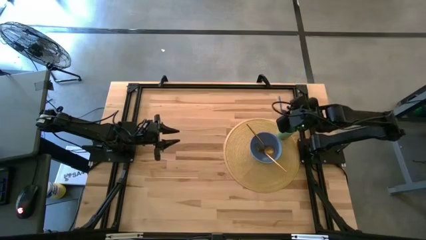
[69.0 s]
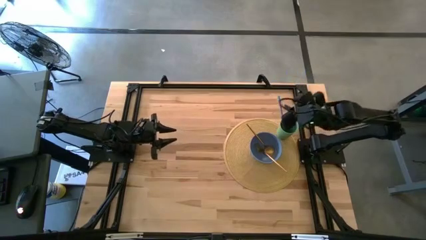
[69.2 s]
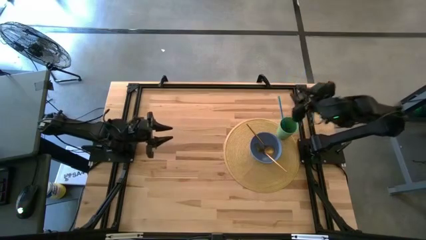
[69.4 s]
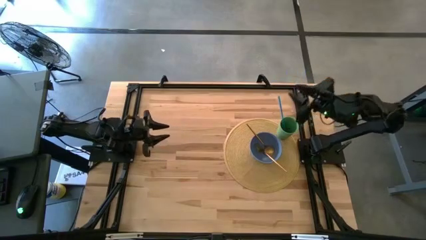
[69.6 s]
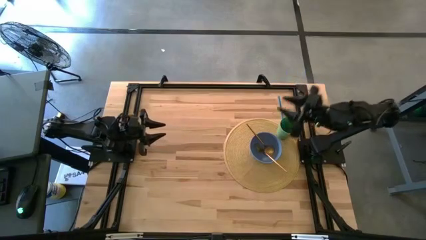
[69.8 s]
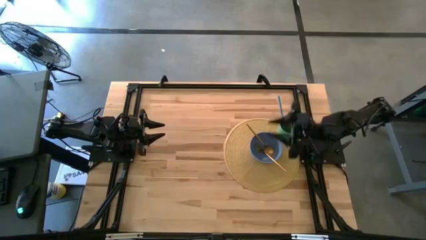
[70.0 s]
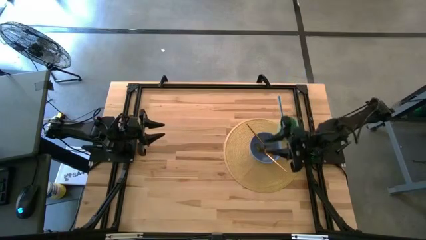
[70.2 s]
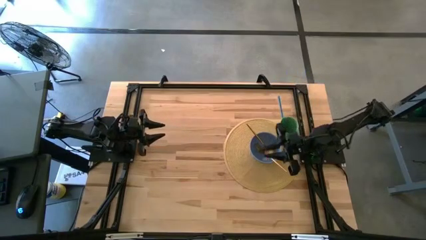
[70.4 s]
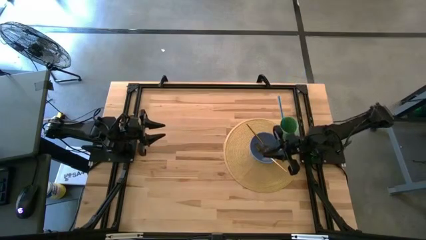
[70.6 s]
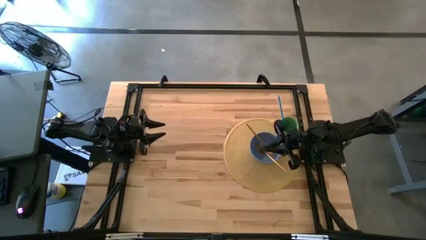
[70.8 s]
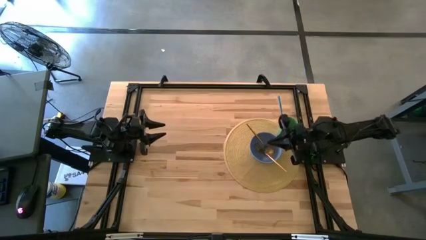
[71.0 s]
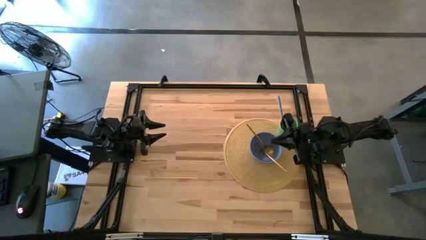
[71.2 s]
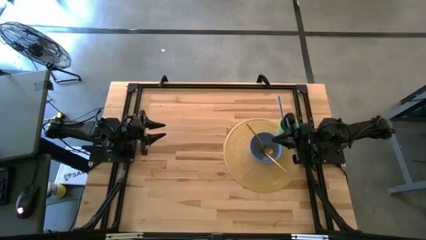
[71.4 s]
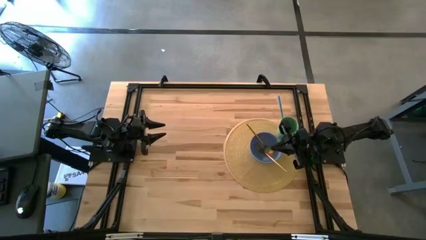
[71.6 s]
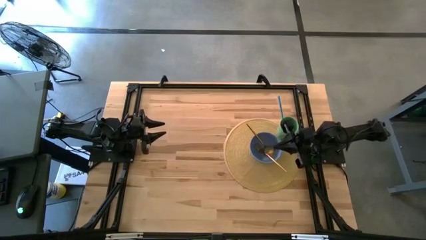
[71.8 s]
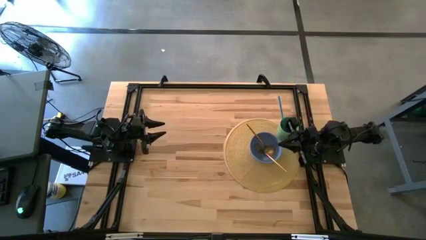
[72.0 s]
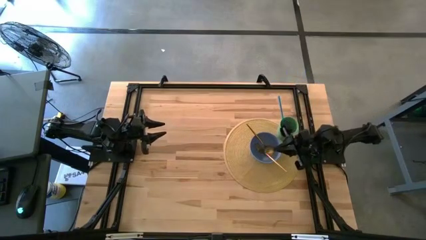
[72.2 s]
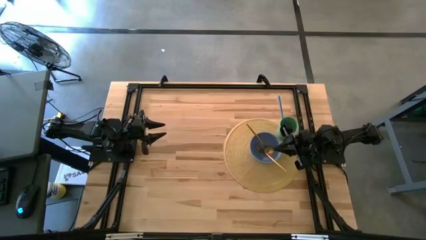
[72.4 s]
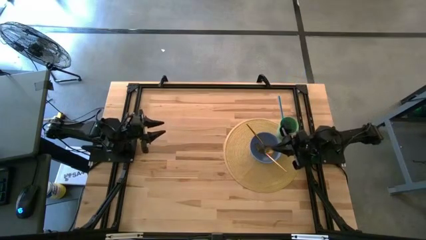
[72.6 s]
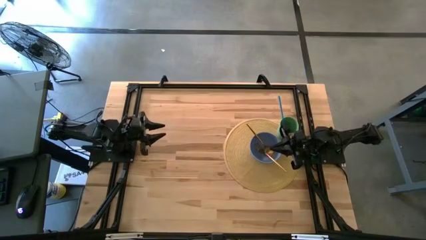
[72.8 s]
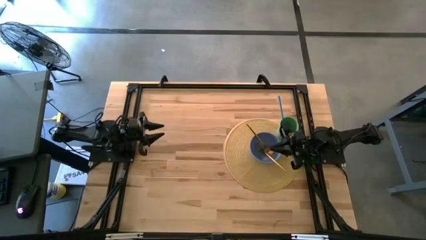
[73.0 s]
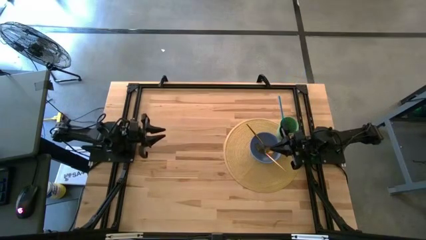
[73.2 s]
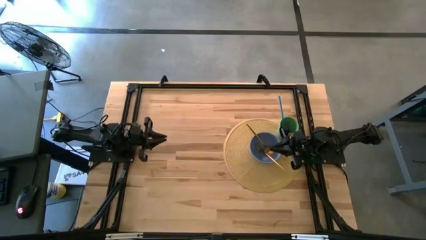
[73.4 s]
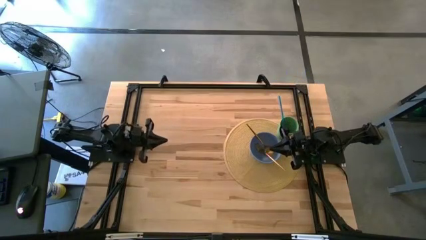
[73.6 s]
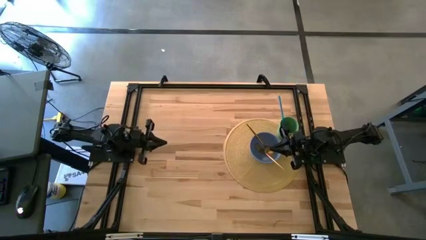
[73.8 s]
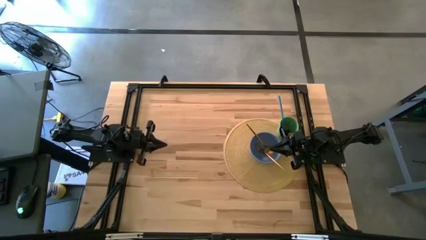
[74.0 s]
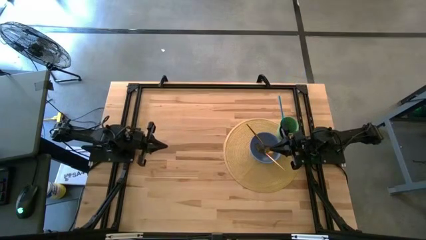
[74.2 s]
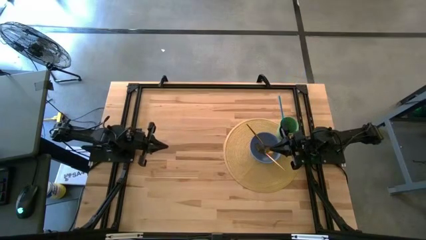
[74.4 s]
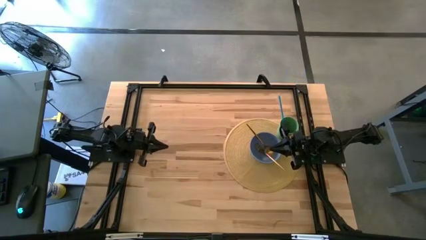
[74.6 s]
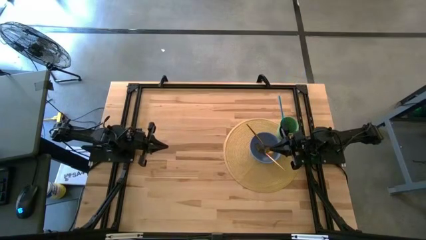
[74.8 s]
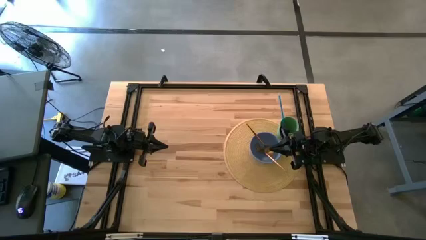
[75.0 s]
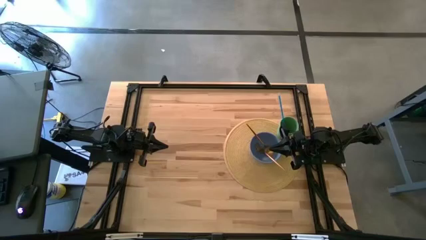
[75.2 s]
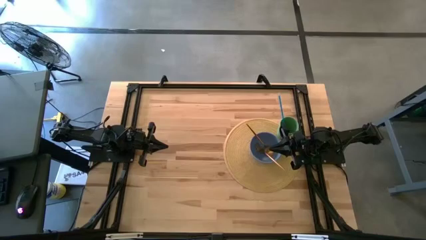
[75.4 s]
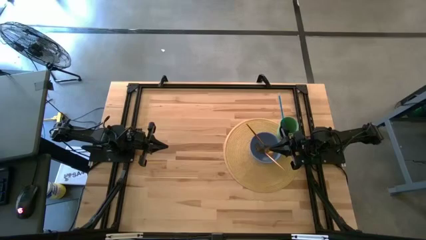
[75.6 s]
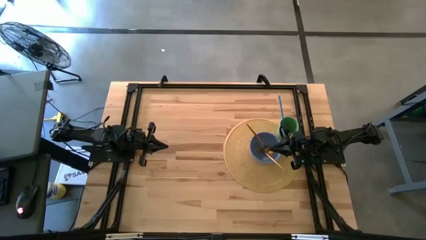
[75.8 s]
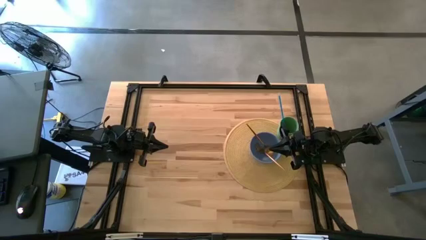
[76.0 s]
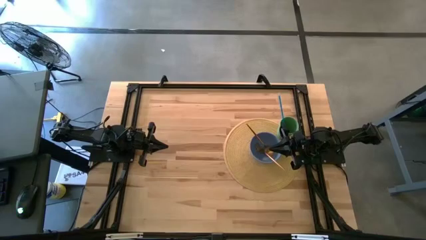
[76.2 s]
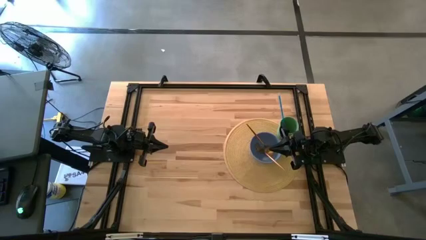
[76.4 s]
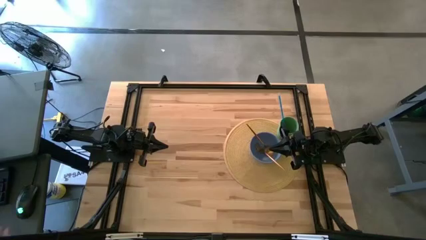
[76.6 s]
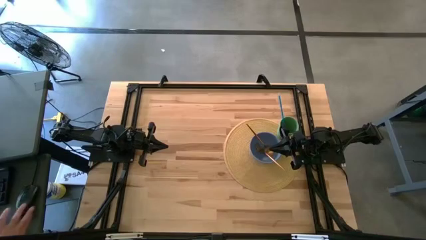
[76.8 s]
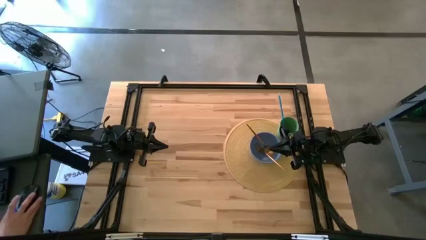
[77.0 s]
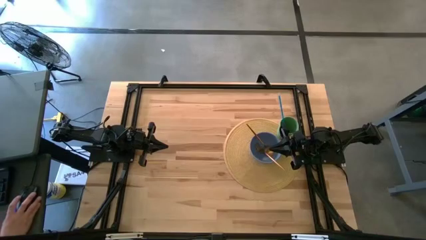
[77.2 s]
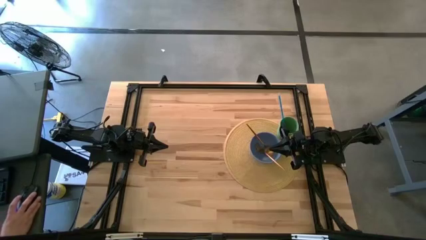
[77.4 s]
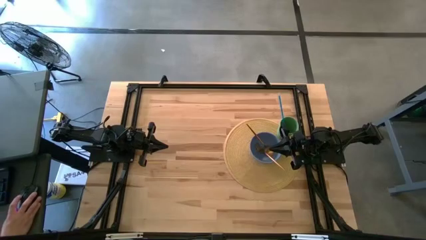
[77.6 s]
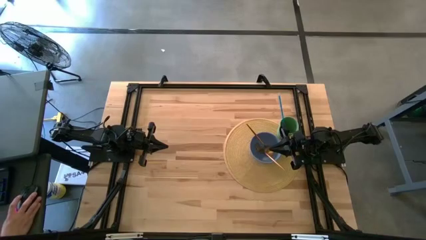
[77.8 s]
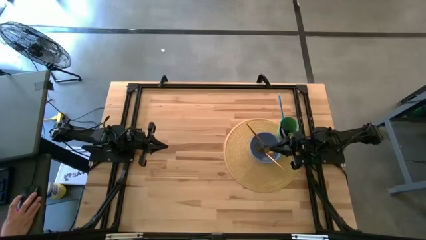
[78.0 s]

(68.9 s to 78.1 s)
Task: Pick & Place Utensil
Return to Home Position
